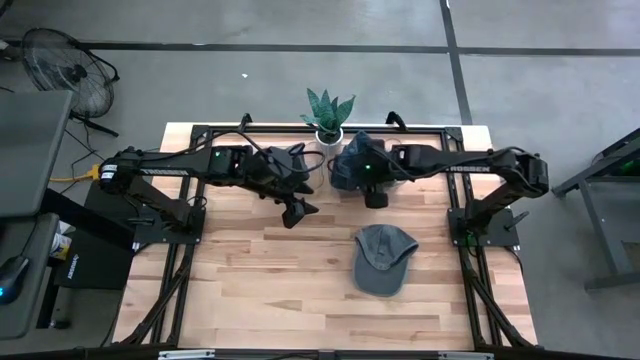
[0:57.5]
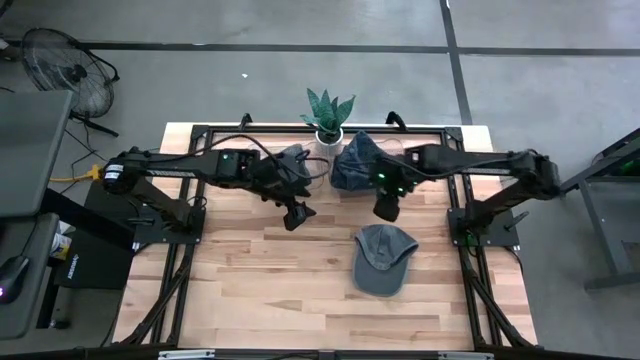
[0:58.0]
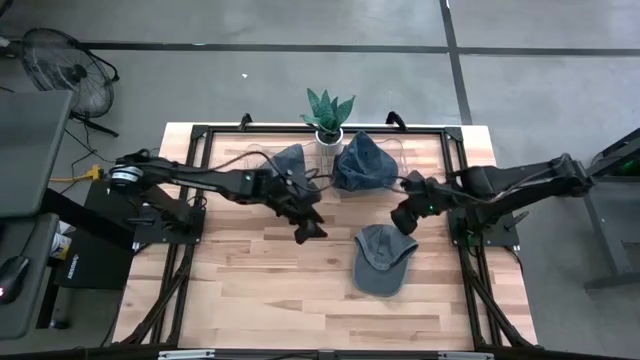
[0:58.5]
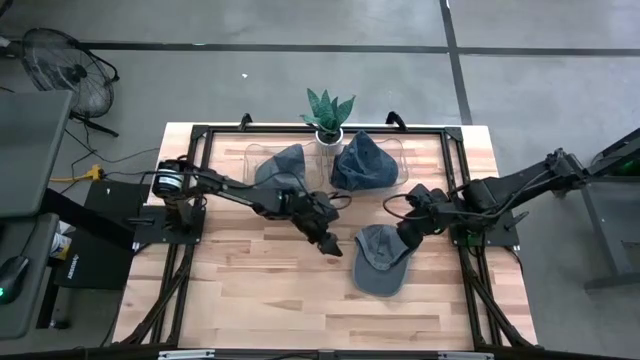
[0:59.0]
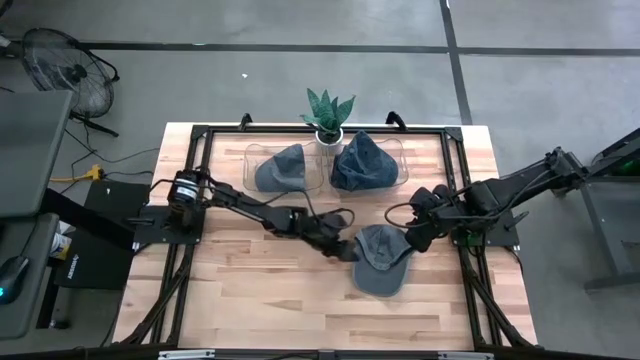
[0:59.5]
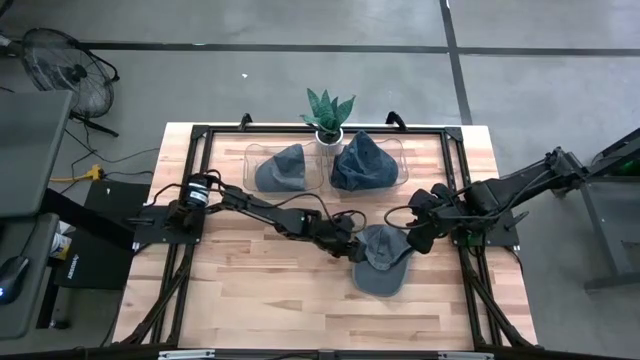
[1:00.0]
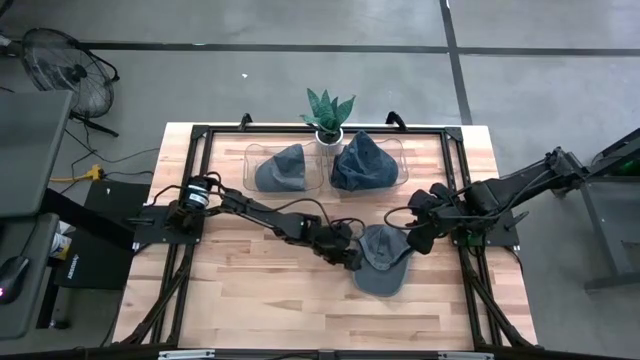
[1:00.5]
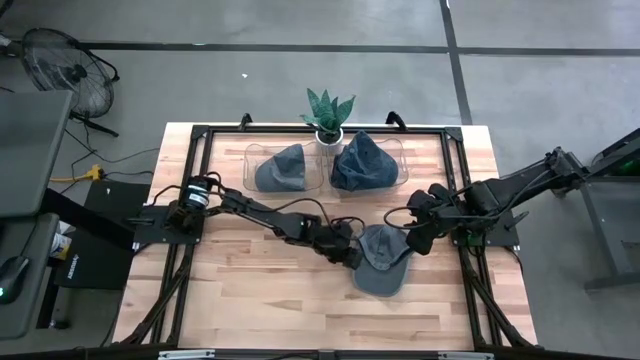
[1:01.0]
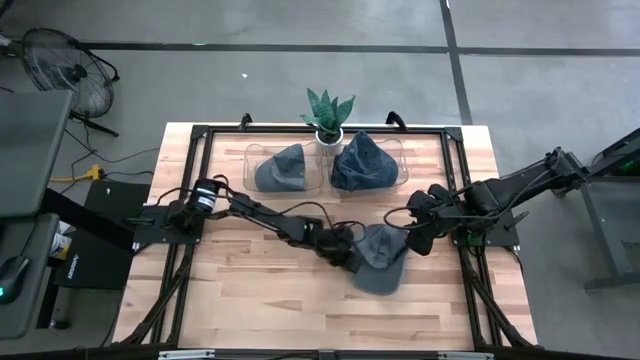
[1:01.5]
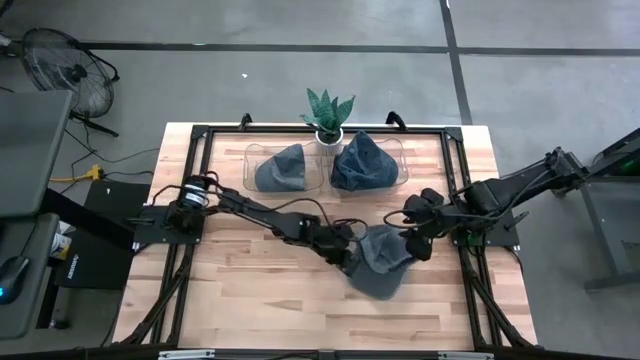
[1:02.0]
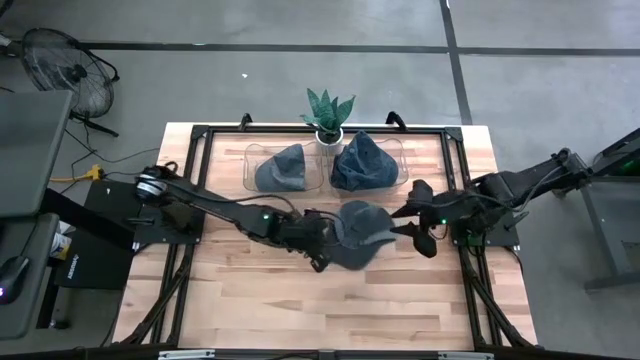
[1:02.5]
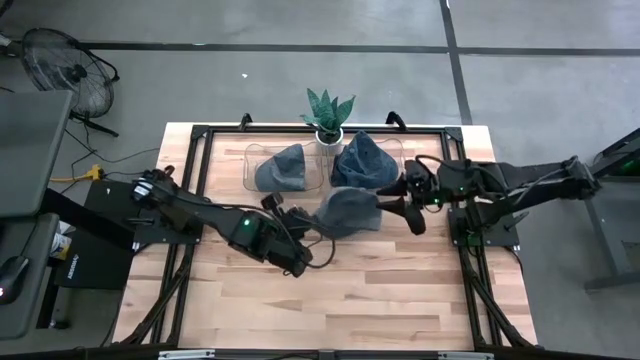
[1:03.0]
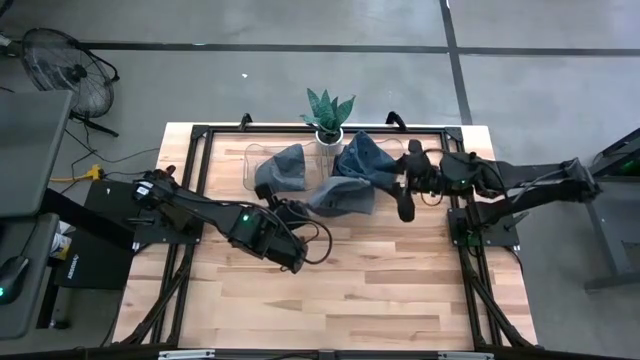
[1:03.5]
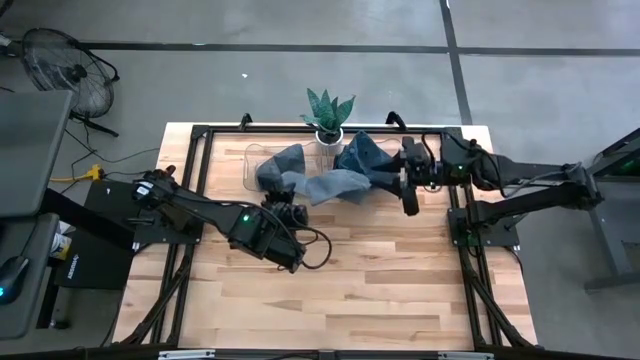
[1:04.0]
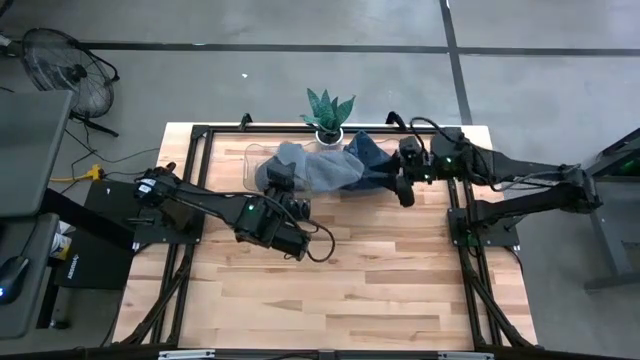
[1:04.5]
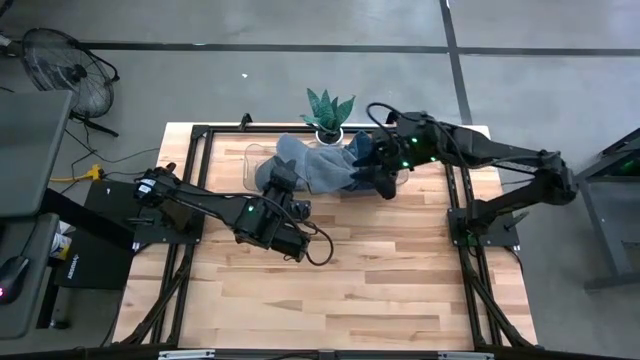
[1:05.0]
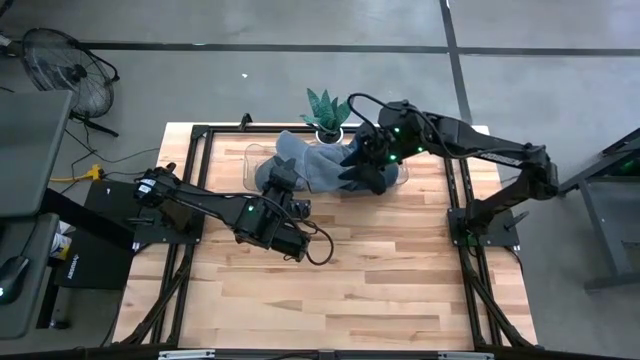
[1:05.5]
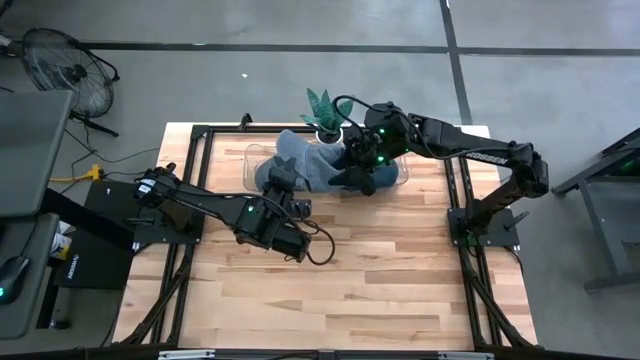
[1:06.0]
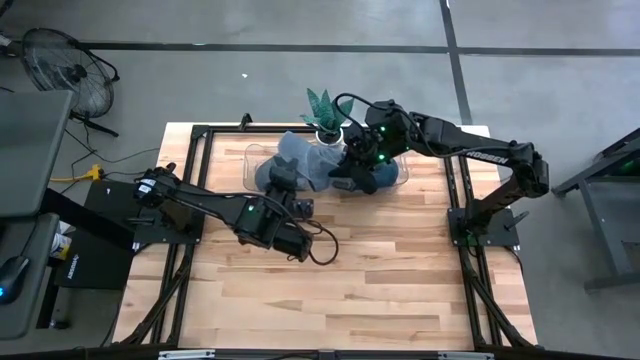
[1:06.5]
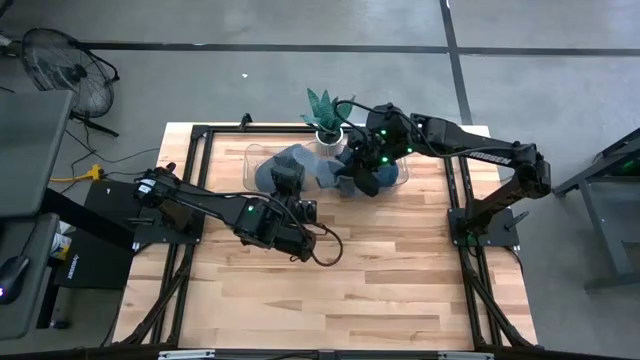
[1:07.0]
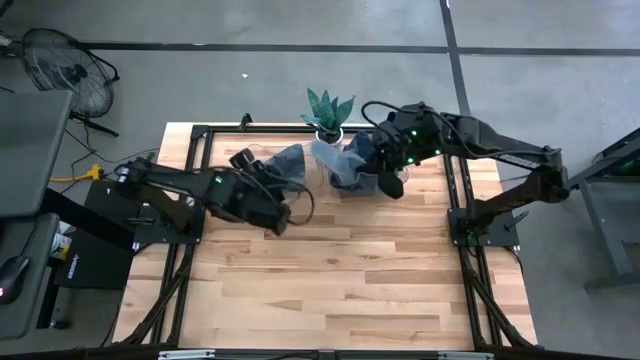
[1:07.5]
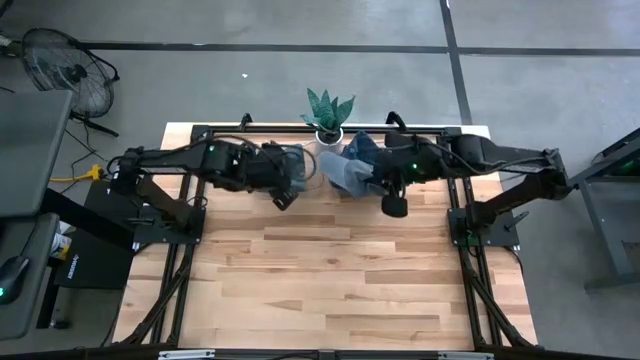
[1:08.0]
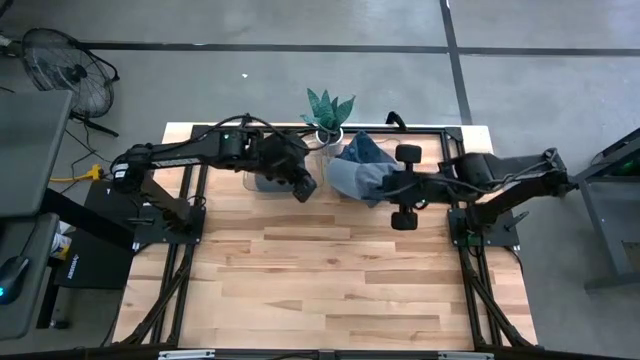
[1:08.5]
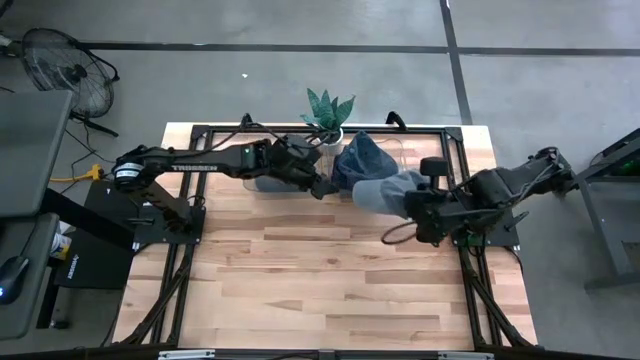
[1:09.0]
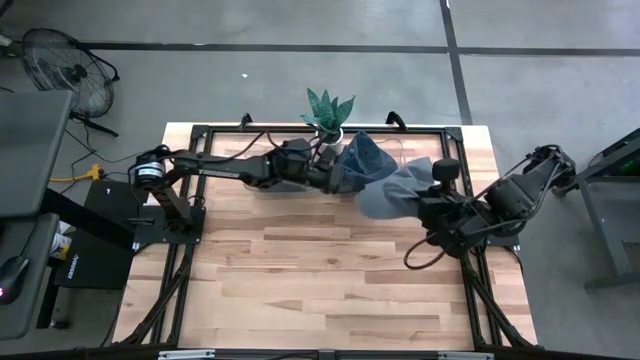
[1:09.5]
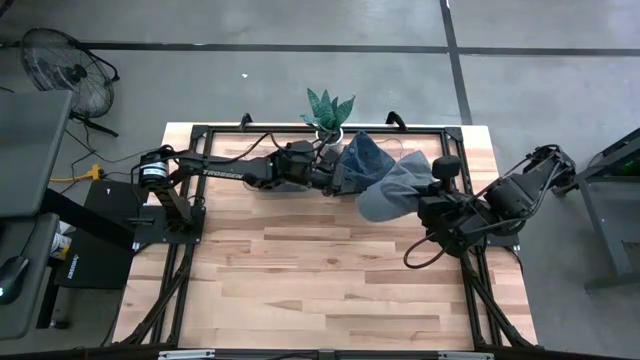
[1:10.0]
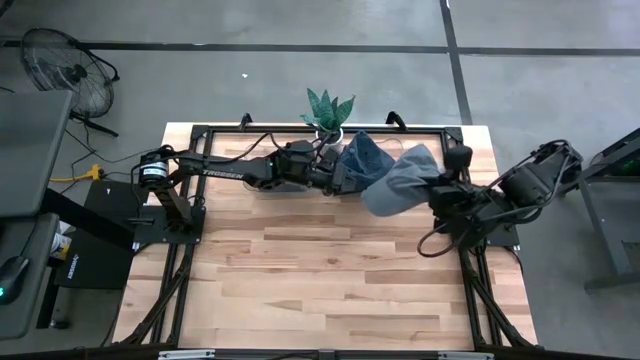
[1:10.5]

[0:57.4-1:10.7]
Task: Pick & Place hat
Put the gray cap into the left transparent bin

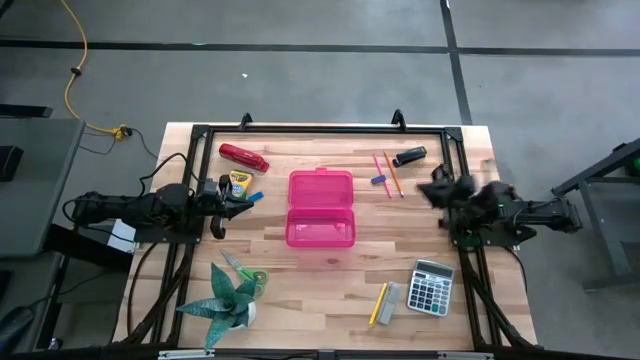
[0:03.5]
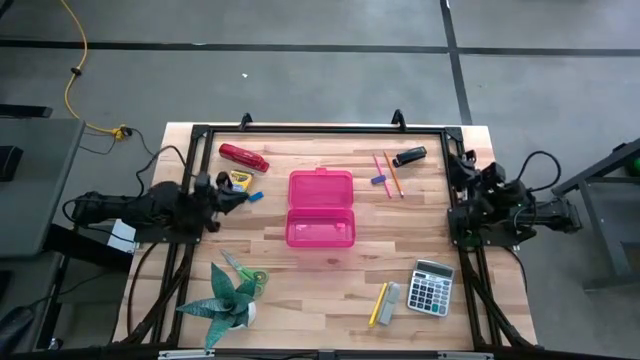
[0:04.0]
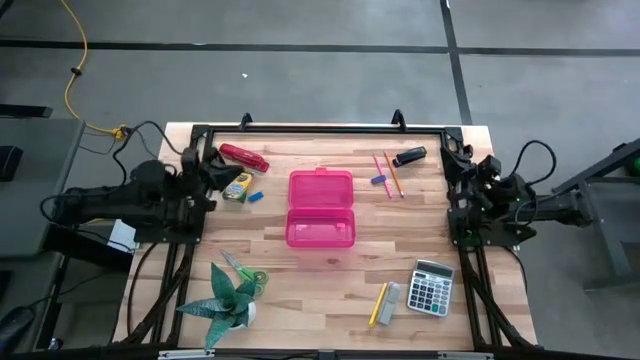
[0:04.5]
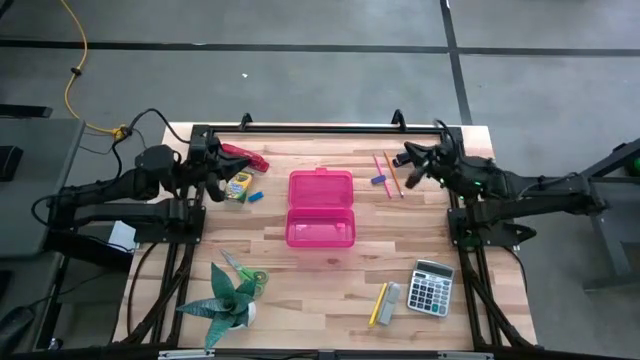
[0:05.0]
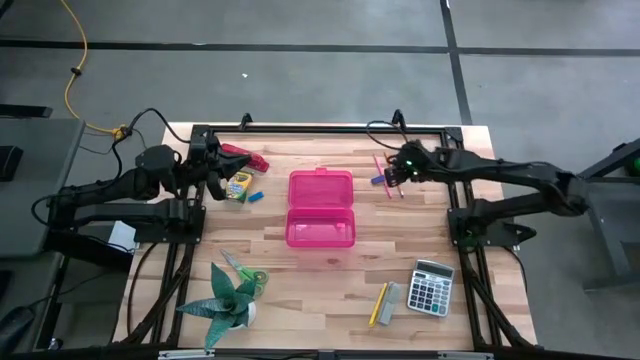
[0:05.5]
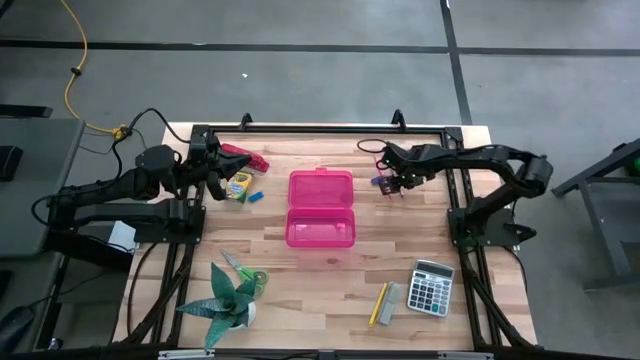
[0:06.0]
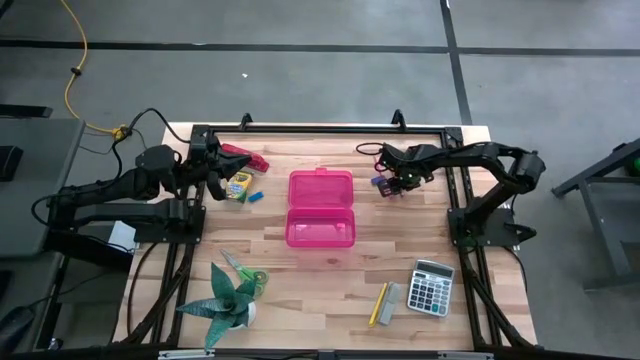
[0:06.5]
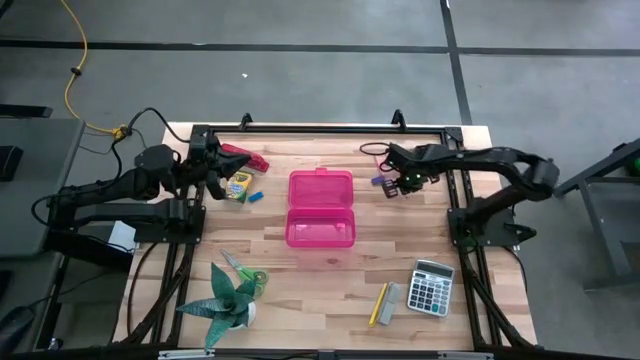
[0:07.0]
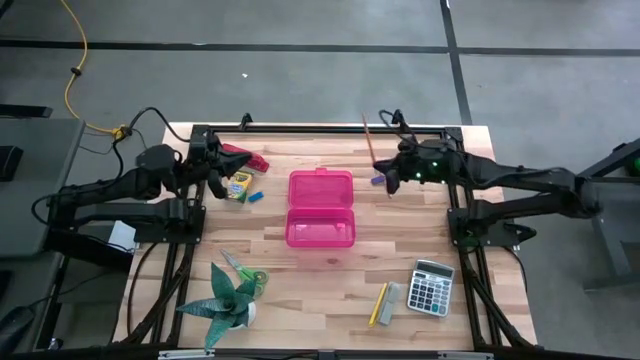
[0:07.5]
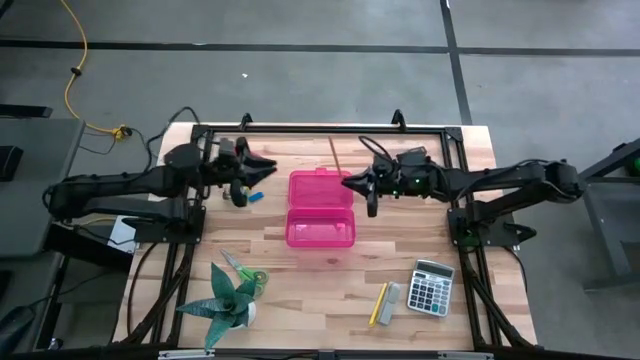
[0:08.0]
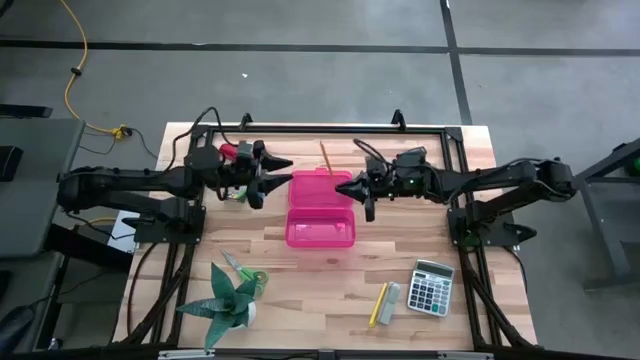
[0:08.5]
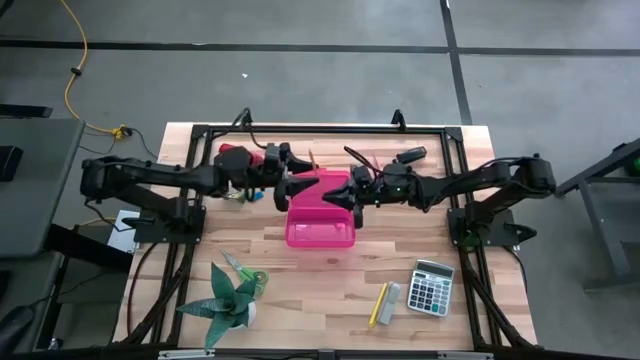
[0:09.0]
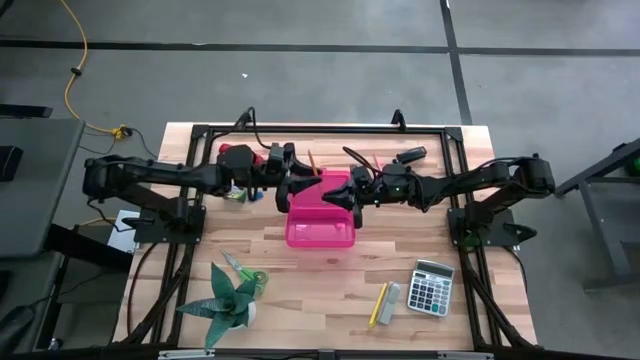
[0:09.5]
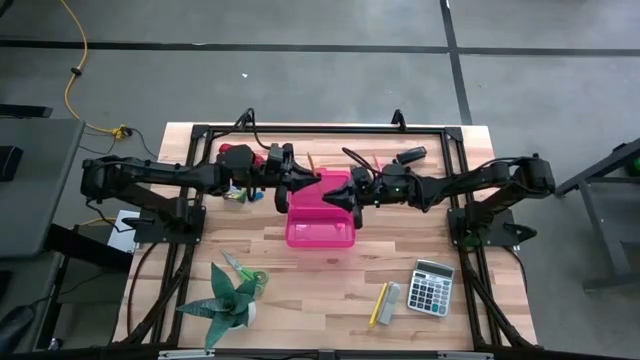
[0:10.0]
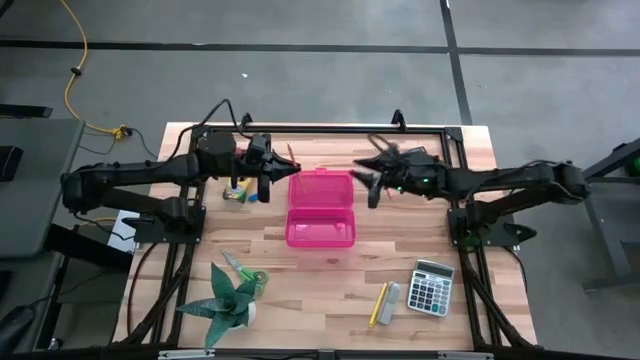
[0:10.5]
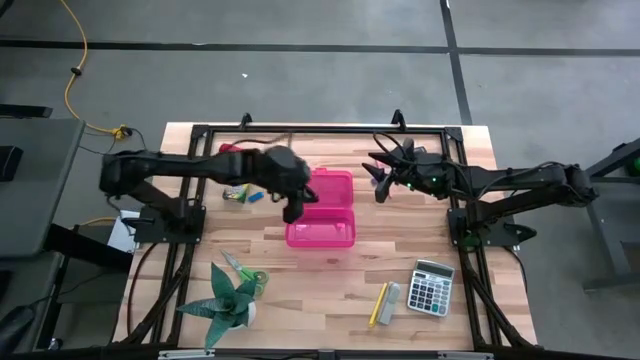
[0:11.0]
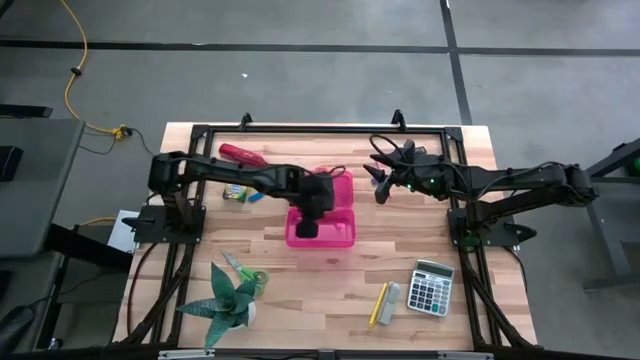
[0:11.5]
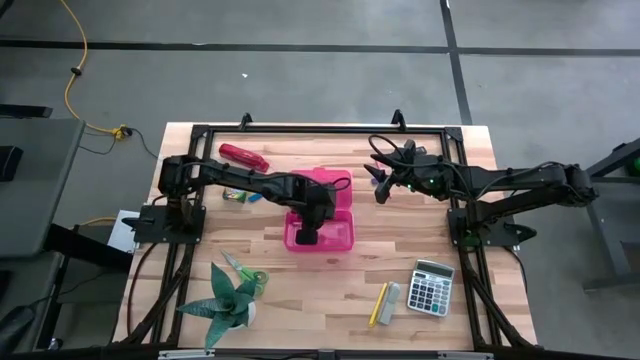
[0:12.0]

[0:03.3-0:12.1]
Task: Pack school essentials
Put the orange pencil into the pink supply box
